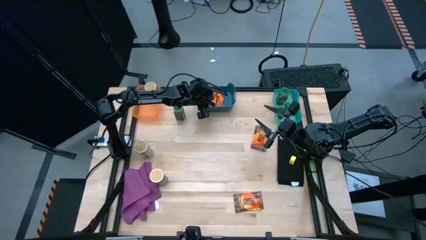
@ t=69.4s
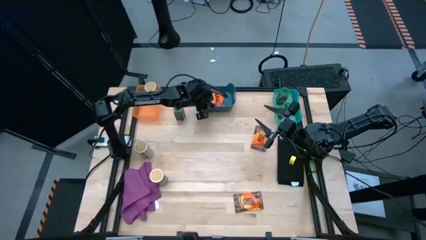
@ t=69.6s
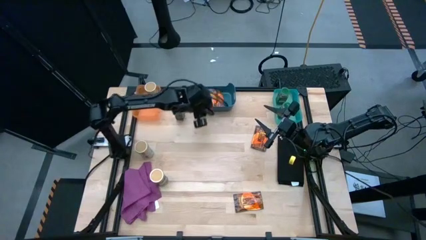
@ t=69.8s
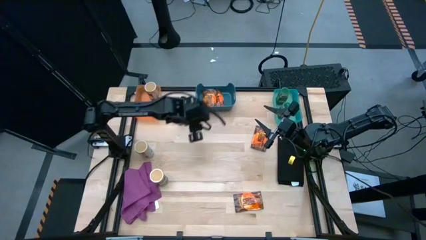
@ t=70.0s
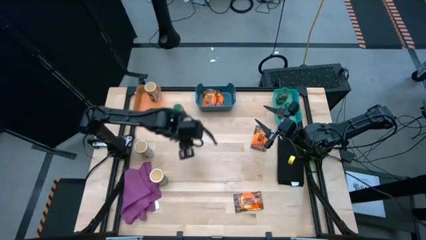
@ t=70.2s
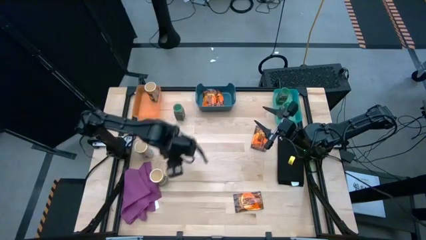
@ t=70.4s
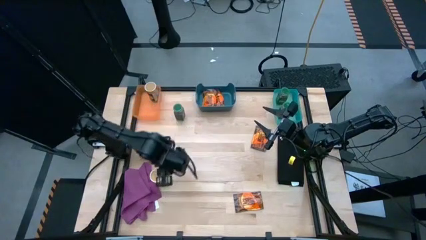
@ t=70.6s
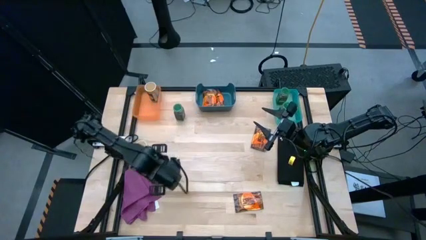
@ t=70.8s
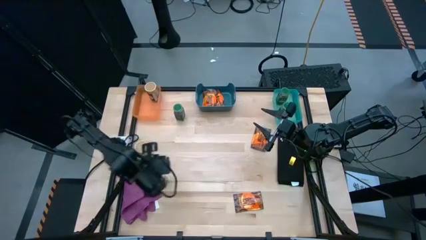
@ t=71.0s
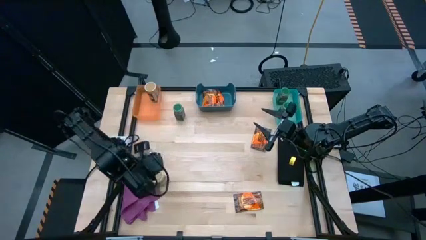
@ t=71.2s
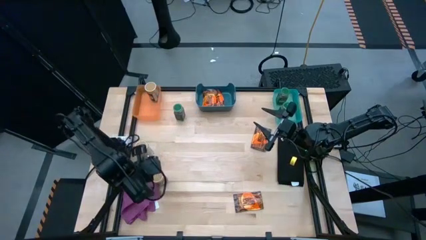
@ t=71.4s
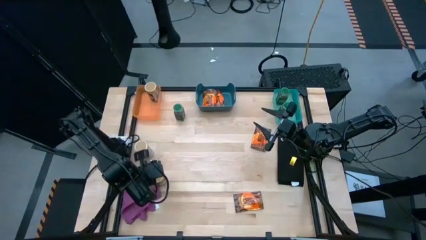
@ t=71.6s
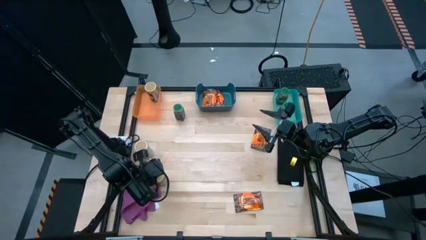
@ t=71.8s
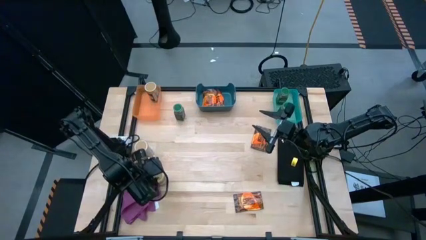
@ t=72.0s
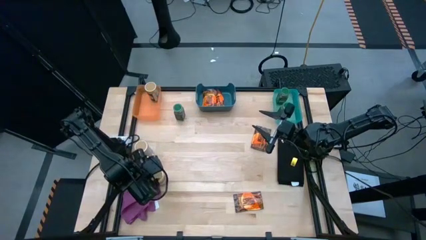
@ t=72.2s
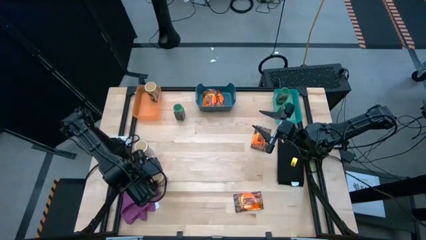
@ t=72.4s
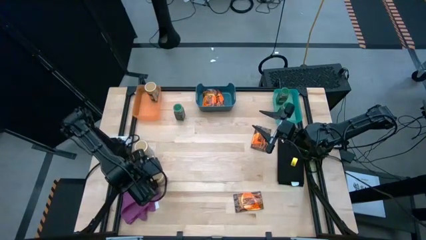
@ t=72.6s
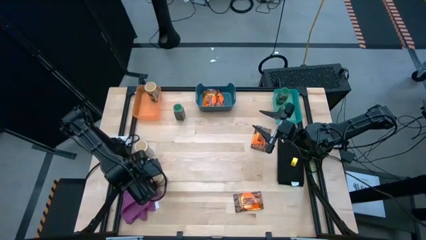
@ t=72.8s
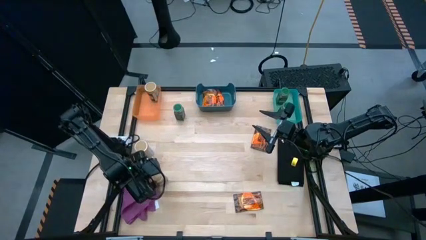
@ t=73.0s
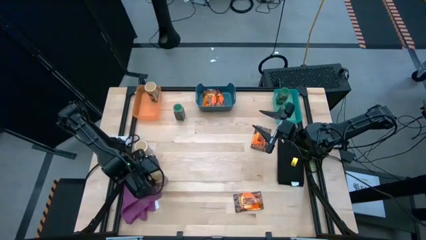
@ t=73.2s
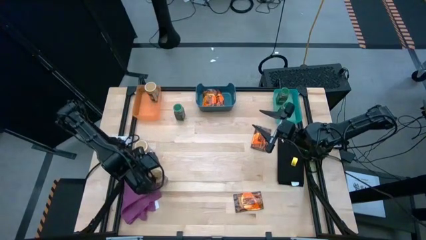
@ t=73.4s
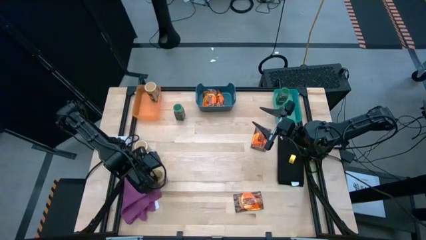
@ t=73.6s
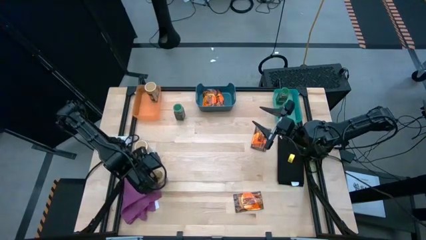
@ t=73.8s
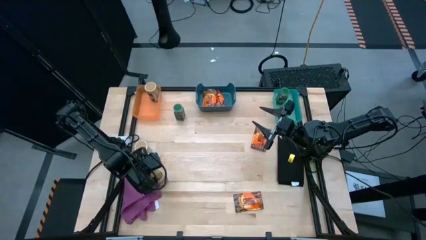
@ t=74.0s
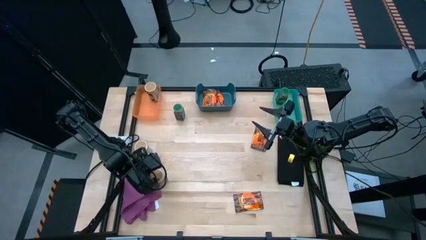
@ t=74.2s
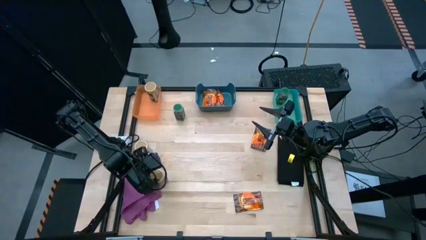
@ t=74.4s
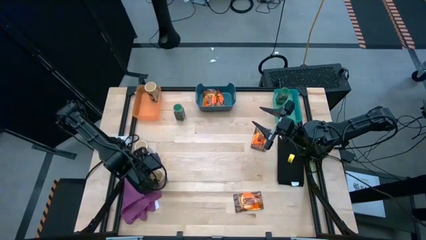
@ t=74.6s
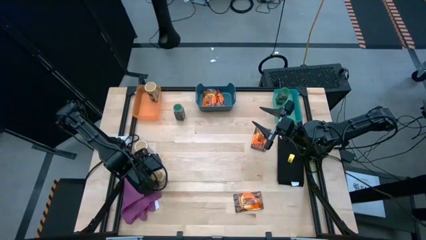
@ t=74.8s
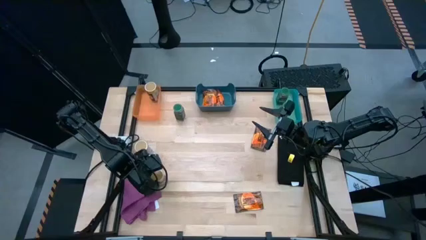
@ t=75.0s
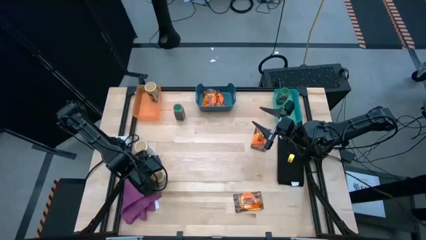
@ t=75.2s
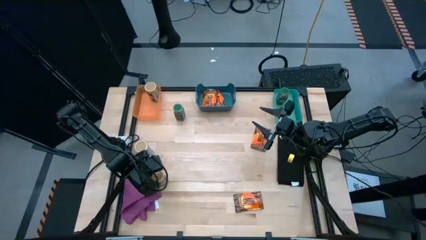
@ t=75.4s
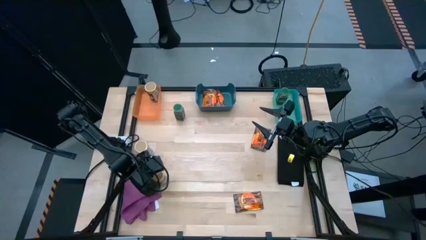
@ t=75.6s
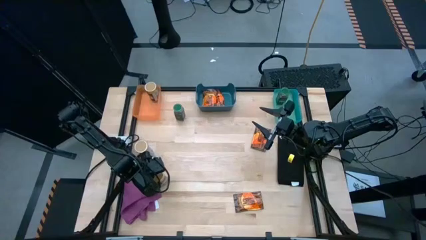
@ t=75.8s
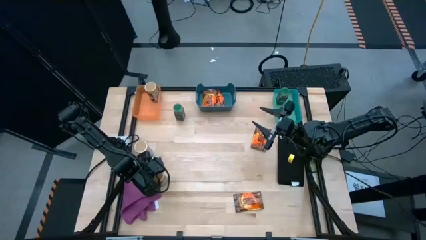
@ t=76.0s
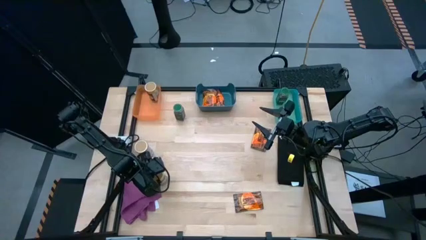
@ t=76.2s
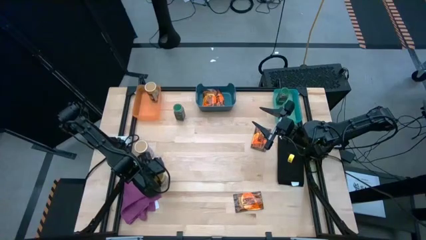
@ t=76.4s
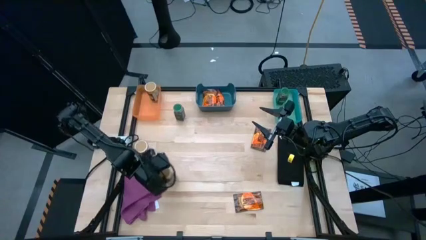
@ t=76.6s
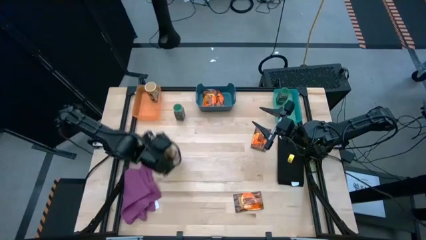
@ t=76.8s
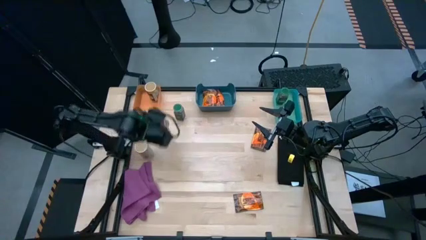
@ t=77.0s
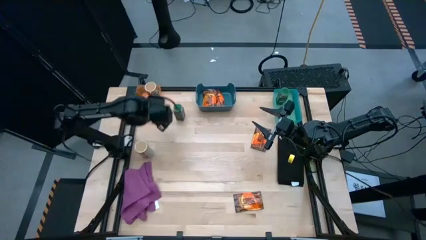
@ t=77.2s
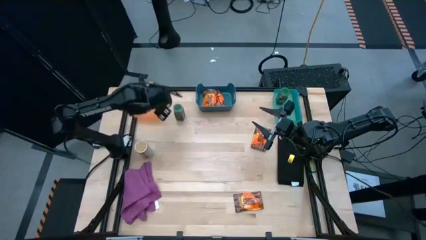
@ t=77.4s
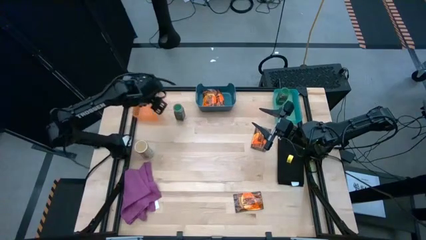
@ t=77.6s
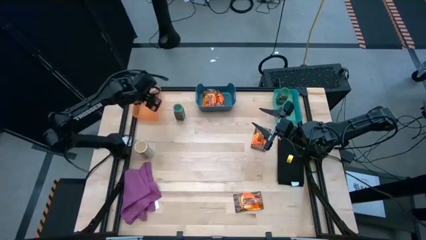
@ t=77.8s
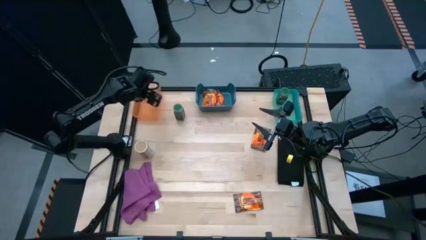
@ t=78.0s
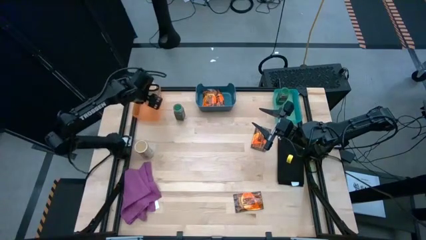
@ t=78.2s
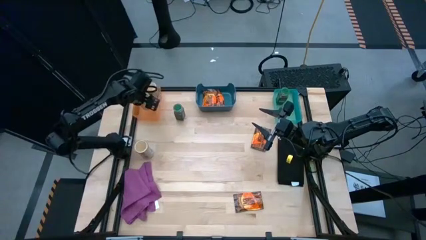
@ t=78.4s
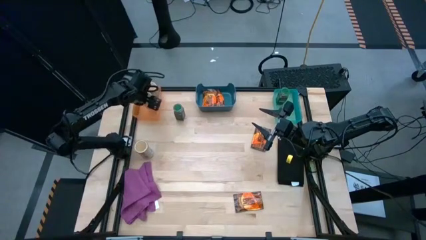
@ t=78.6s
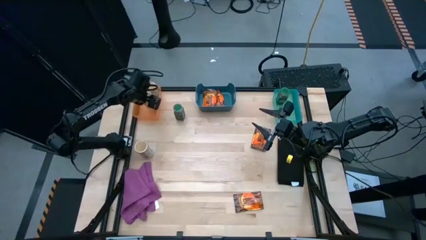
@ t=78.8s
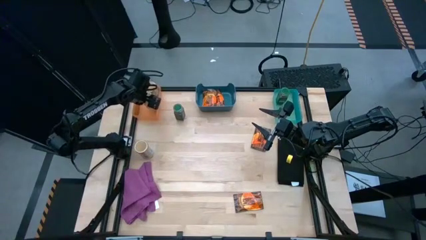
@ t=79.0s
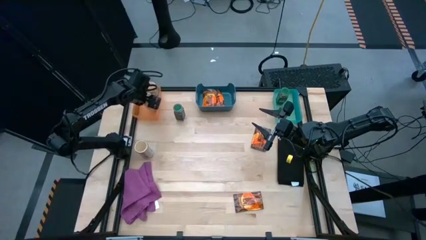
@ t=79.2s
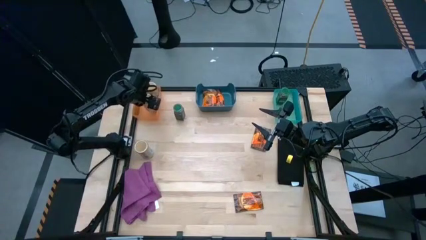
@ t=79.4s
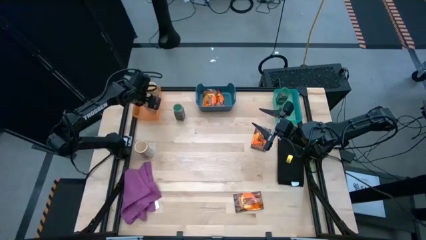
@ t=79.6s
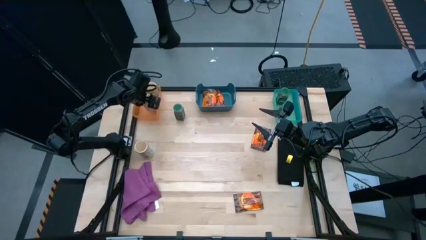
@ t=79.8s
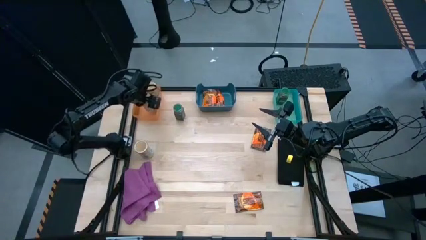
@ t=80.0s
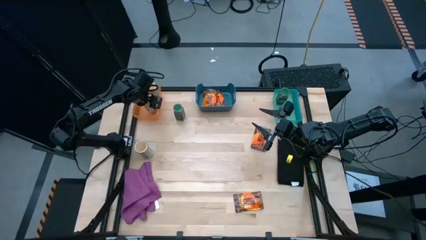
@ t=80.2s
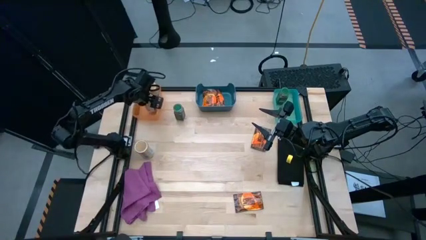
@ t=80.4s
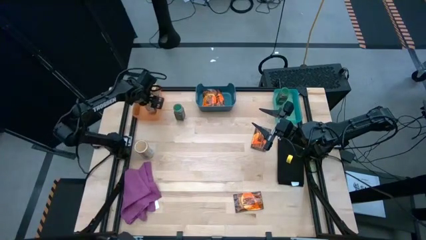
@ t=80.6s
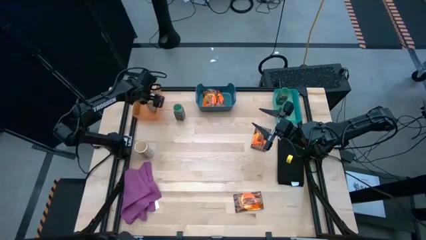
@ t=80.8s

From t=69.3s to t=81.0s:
Task: Sort spices by type
Put the bottom gold seasoning bottle into the orange bin

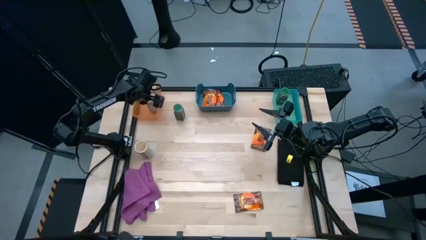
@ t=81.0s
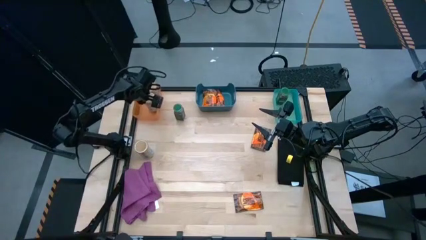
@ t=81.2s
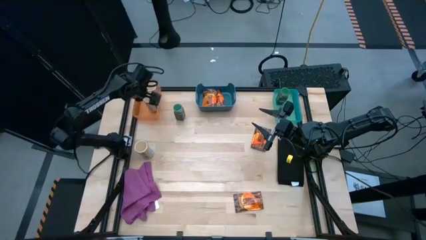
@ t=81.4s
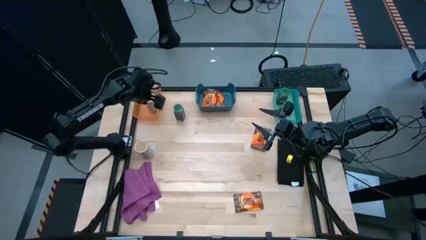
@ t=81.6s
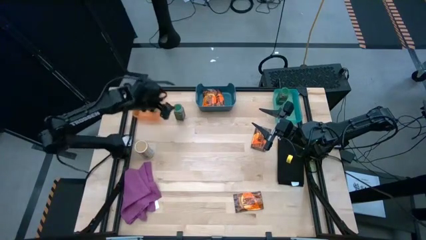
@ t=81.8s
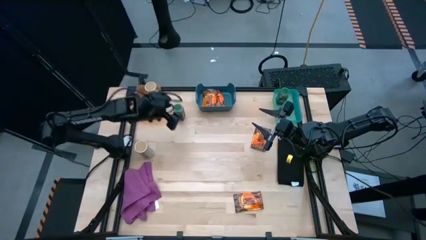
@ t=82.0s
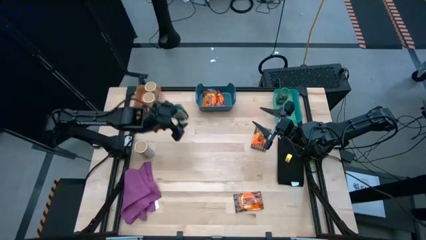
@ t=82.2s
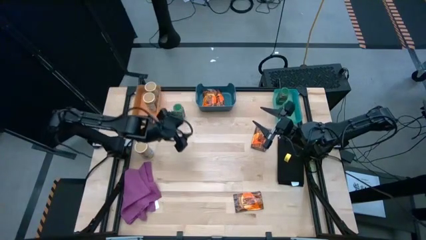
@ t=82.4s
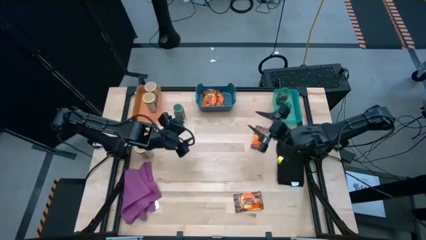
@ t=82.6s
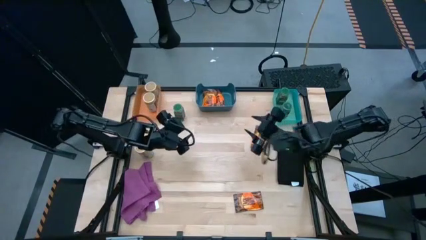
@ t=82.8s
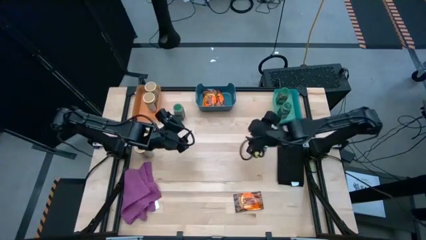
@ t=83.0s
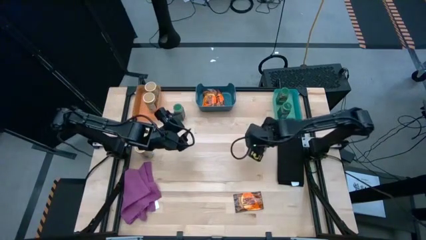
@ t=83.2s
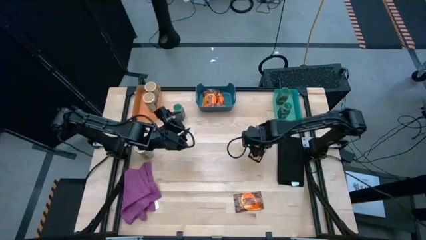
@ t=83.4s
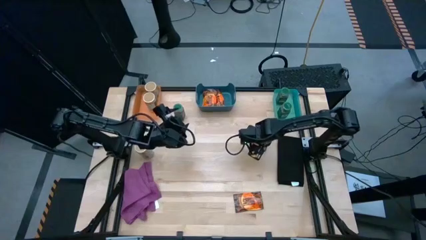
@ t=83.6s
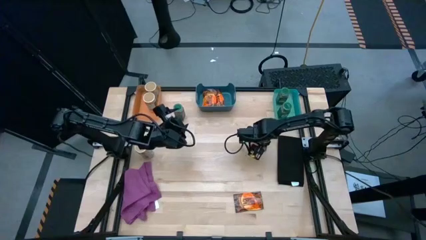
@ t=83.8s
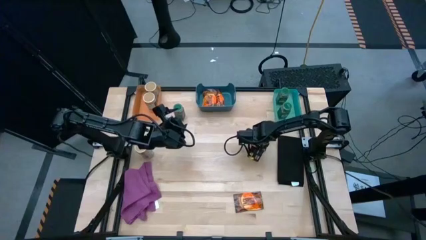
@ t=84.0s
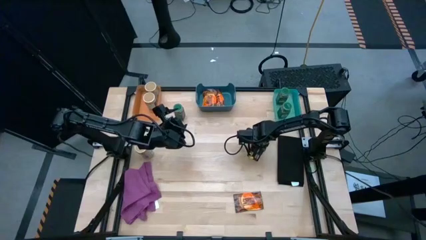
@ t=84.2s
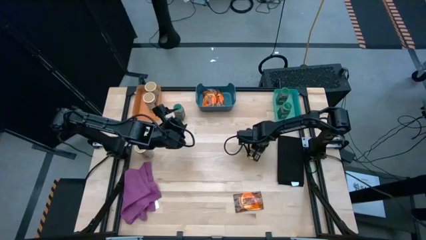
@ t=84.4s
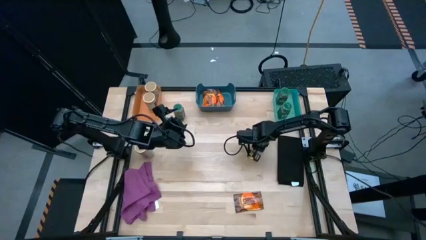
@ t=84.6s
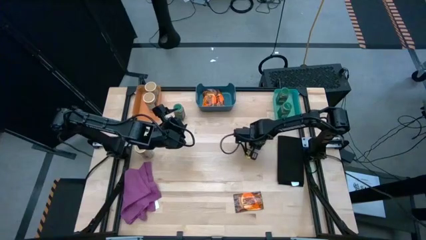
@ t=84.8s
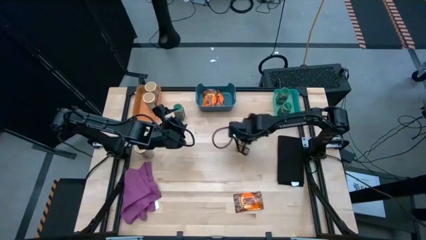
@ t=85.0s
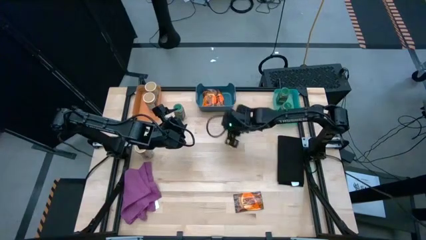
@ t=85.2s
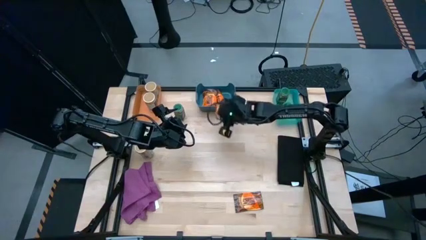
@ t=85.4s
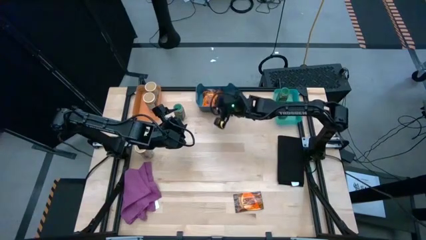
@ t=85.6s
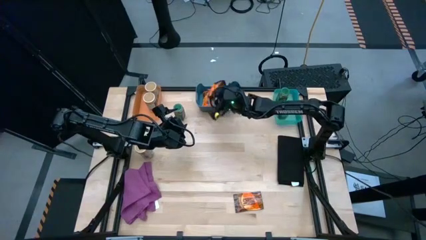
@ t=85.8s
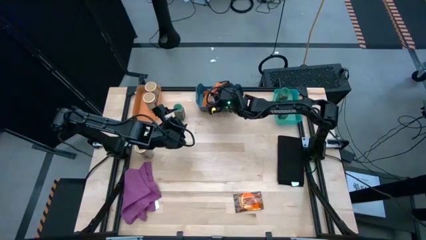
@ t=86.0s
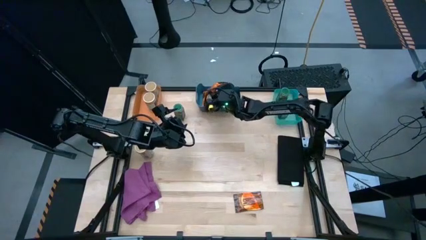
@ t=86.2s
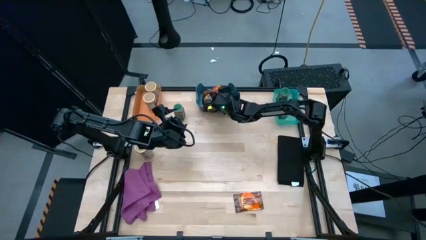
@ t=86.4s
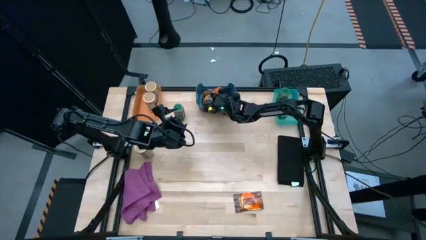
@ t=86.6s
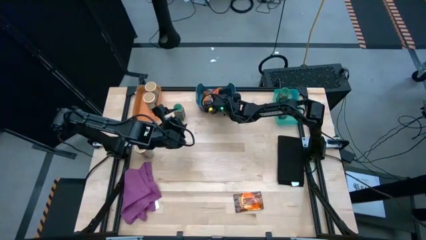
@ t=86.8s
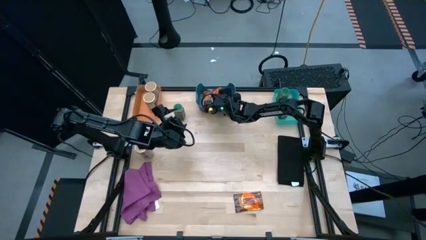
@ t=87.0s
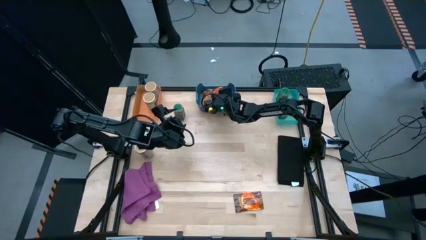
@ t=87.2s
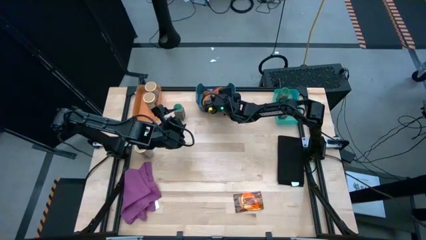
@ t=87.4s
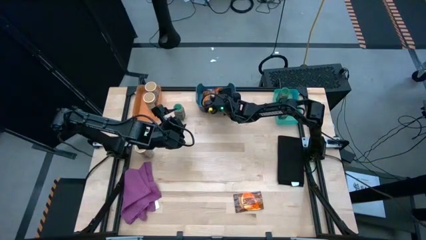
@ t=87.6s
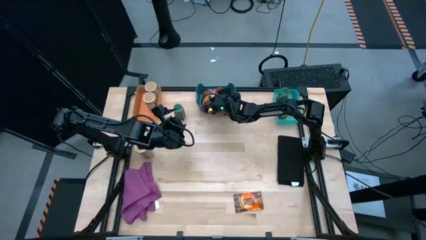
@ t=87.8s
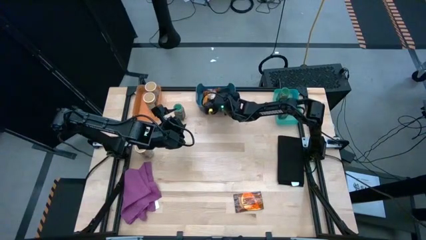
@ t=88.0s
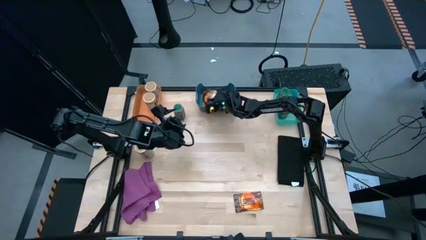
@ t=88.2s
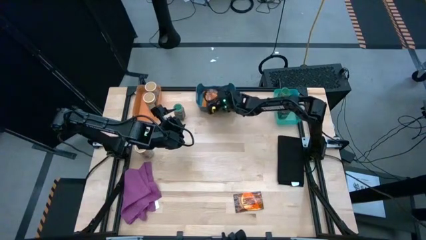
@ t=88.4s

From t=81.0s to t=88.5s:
Put the top orange seasoning into the dark blue bin
